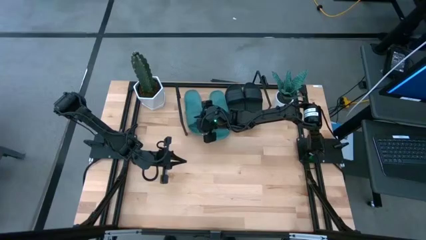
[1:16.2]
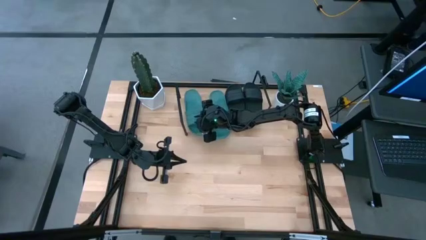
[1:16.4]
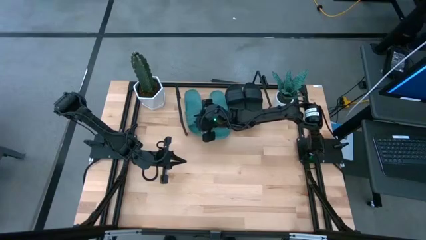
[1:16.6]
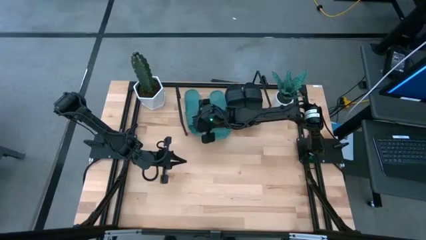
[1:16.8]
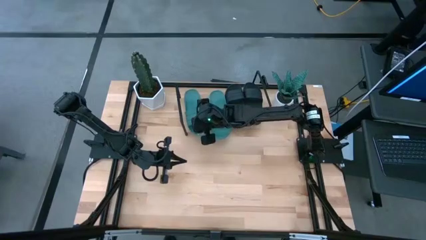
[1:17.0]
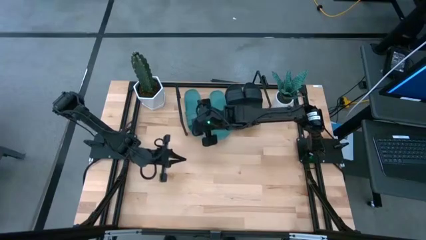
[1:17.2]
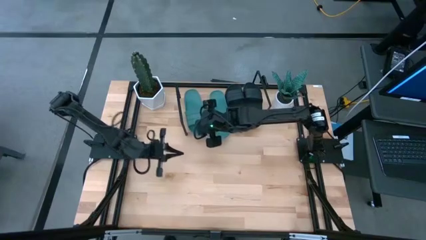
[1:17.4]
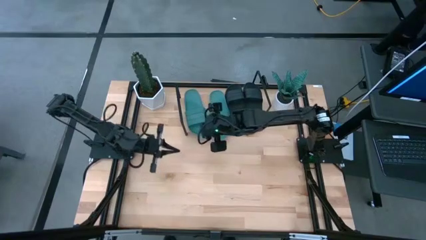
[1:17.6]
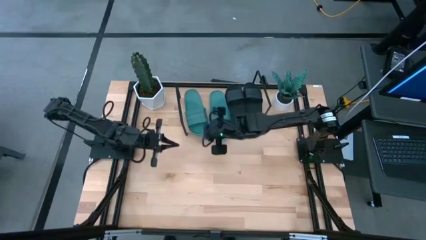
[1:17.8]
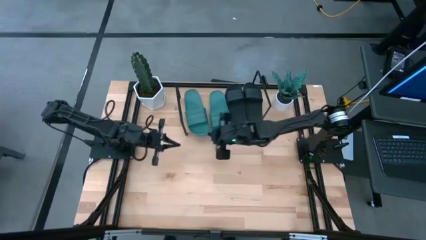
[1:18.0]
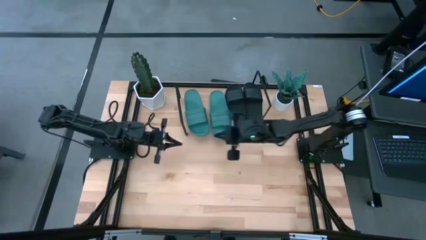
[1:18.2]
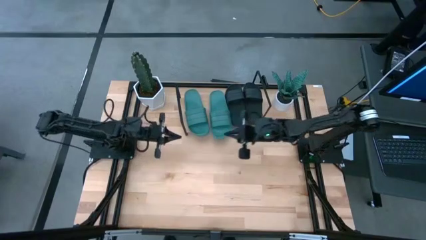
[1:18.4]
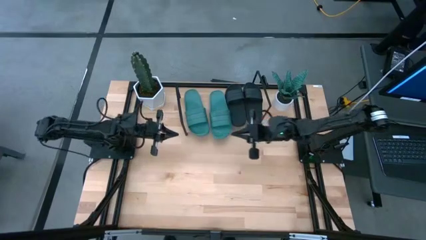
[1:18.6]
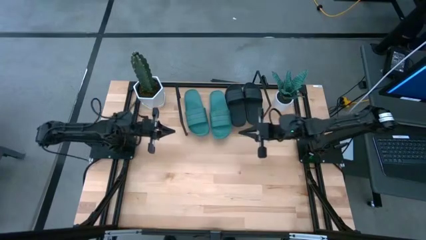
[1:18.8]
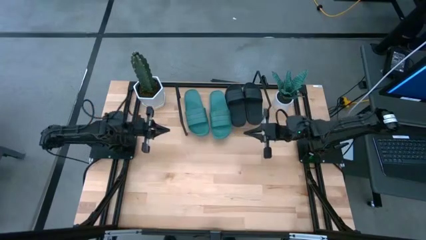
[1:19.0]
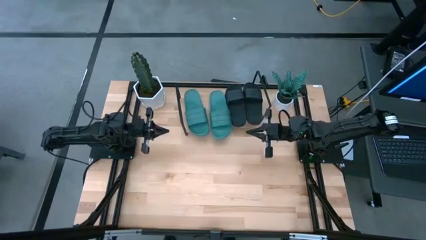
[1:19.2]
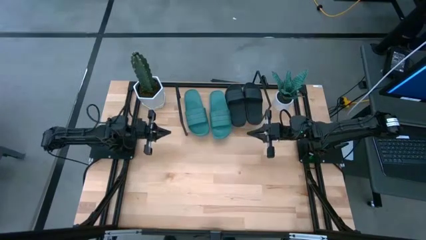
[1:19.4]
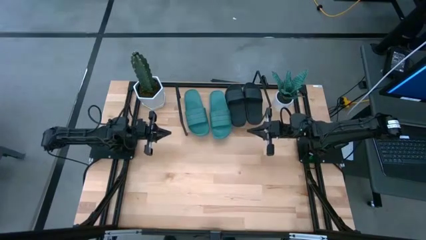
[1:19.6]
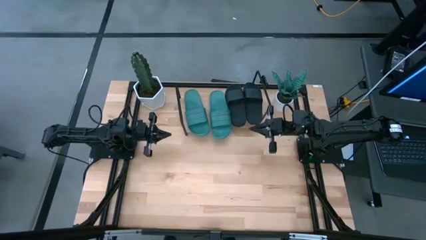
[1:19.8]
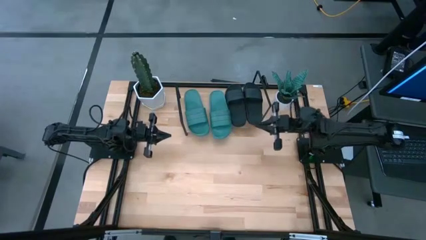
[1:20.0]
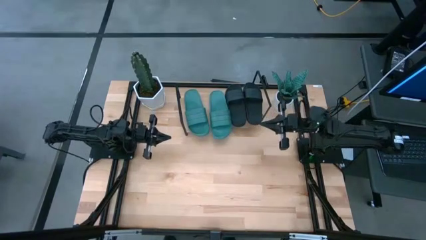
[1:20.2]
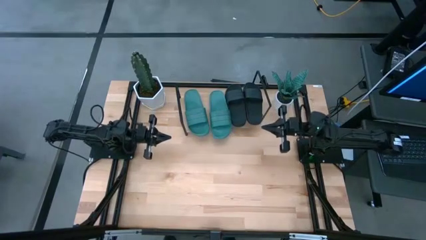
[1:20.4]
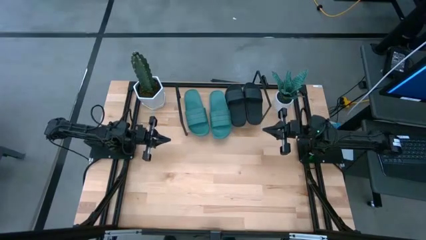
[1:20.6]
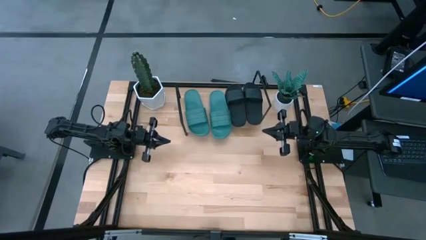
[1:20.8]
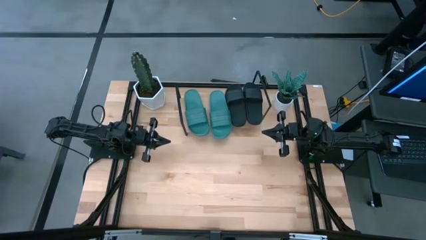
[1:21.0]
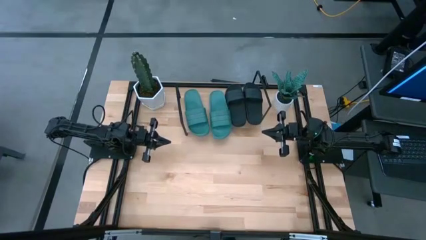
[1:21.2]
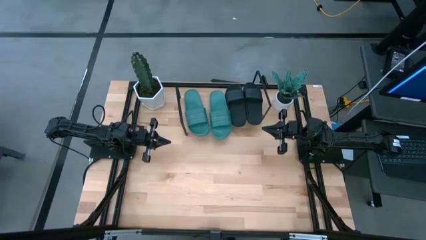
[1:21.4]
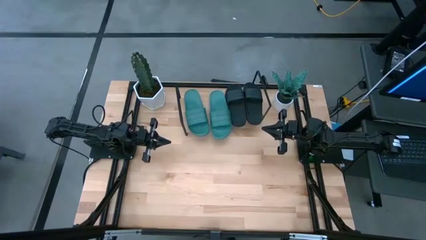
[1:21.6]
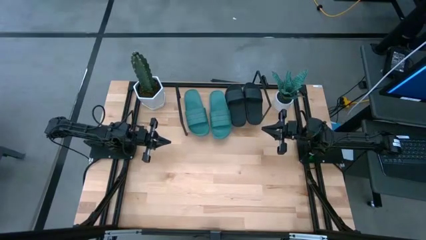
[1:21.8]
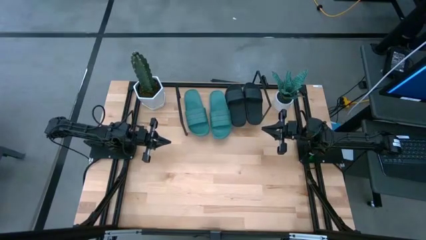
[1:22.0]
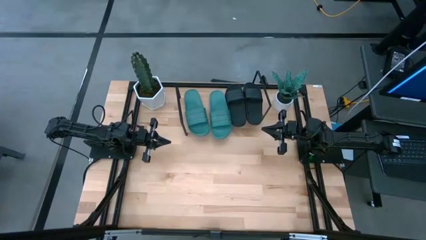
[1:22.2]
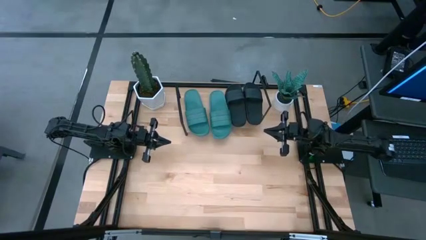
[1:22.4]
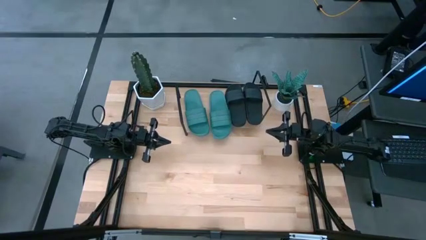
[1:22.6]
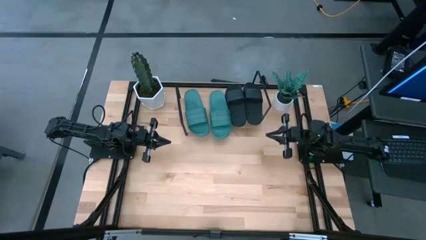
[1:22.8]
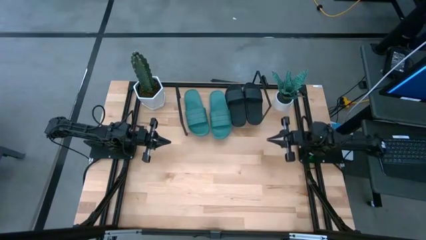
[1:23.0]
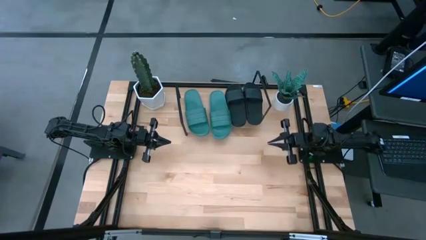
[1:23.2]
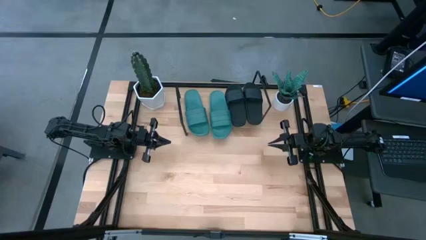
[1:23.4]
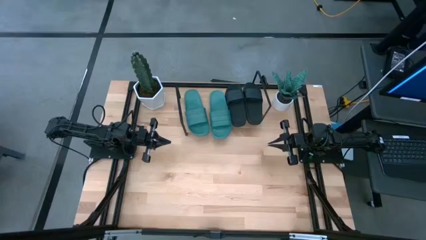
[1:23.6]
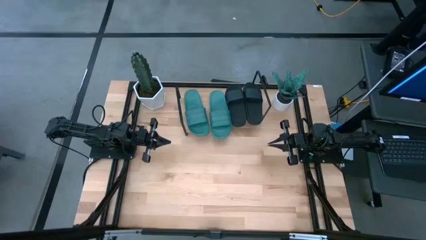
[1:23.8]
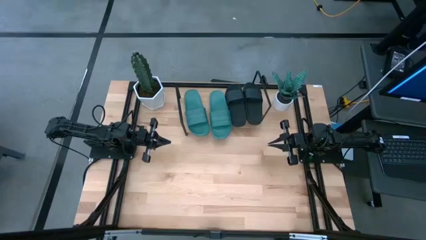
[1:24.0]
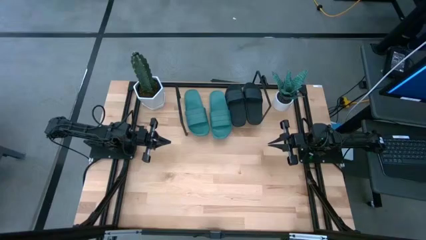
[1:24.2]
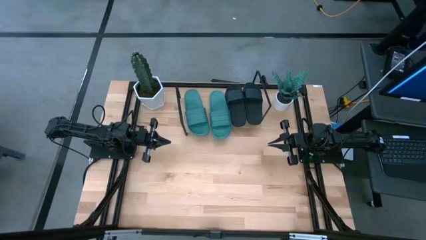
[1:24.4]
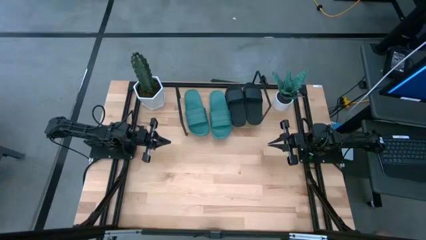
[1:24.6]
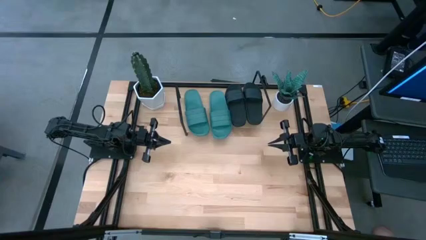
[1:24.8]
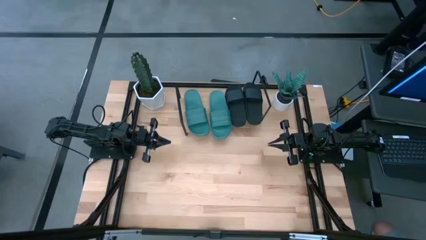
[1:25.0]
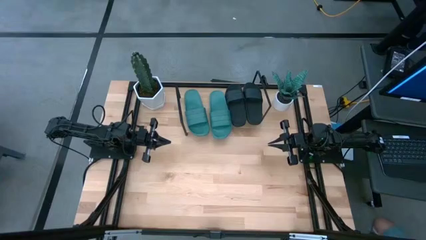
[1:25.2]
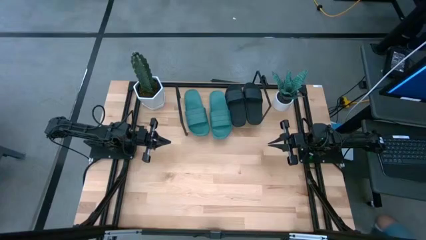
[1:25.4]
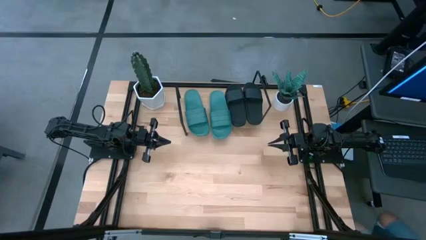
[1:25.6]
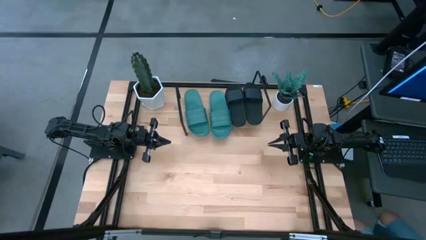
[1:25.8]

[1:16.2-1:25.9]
Task: Pick and place slides into the shelf
Return to Home Position
